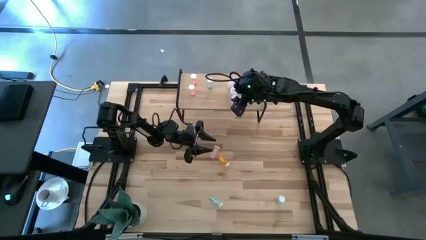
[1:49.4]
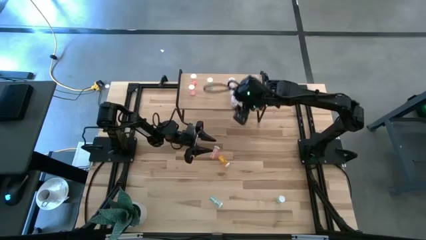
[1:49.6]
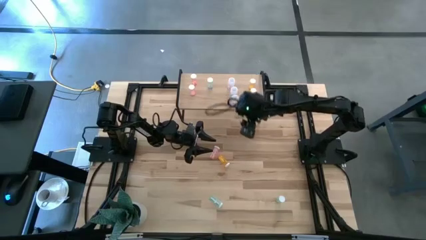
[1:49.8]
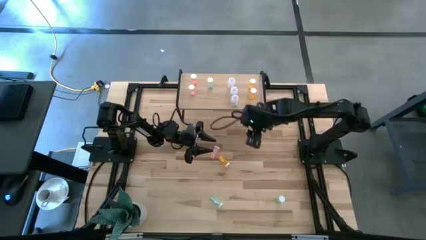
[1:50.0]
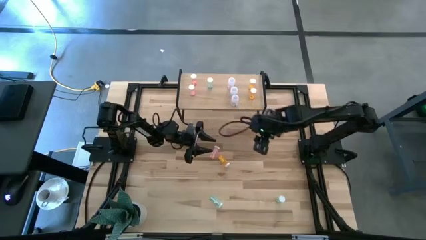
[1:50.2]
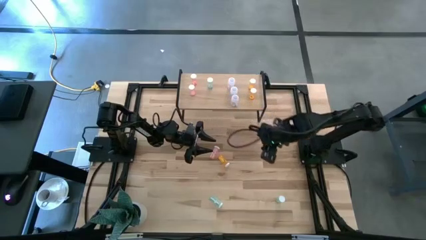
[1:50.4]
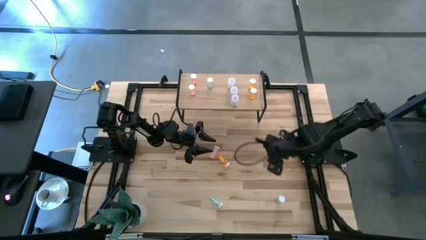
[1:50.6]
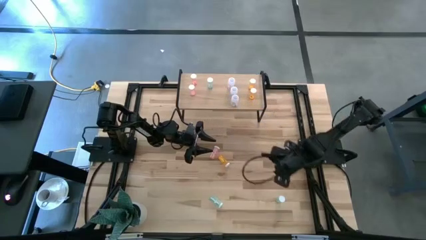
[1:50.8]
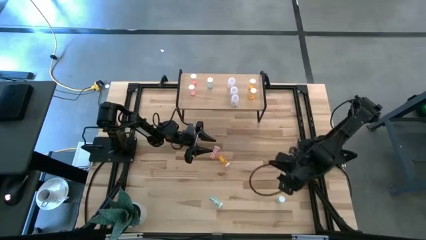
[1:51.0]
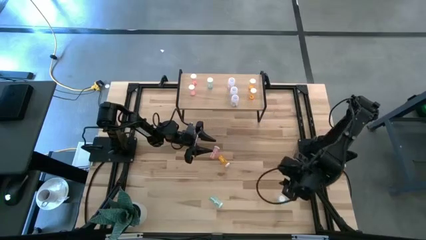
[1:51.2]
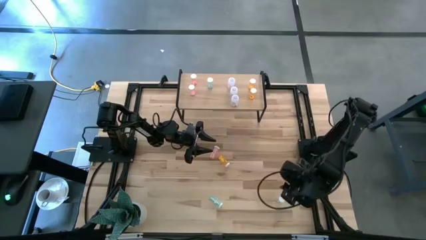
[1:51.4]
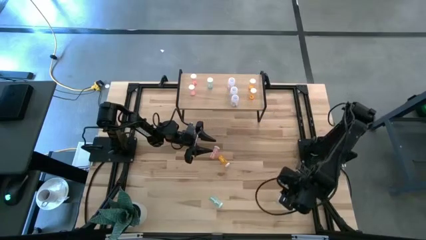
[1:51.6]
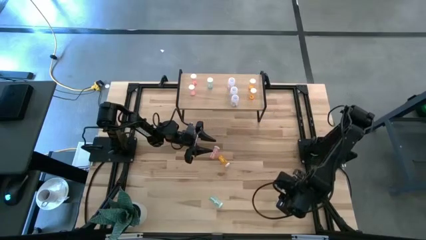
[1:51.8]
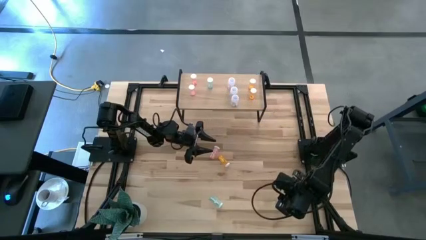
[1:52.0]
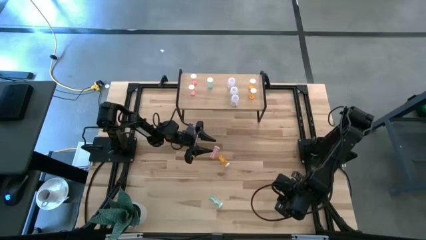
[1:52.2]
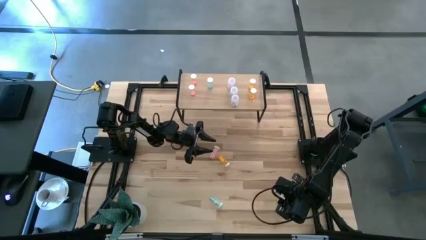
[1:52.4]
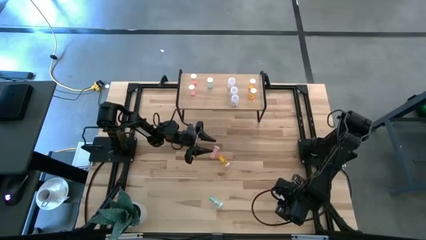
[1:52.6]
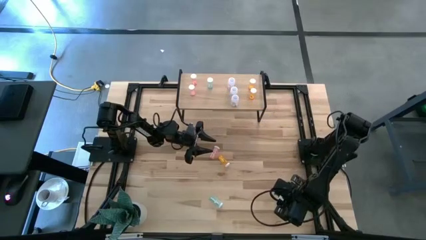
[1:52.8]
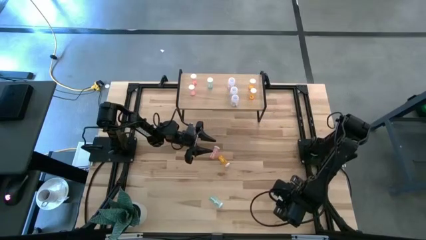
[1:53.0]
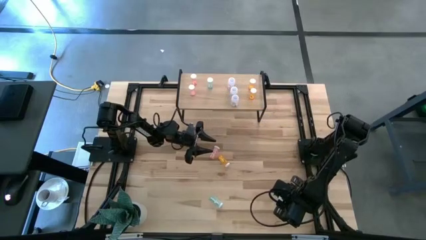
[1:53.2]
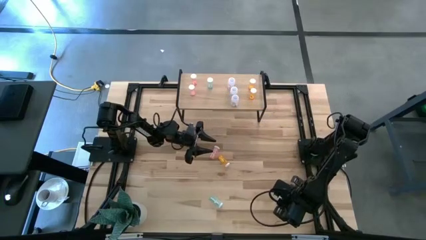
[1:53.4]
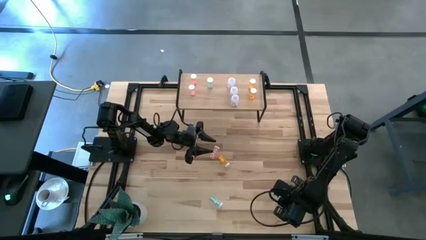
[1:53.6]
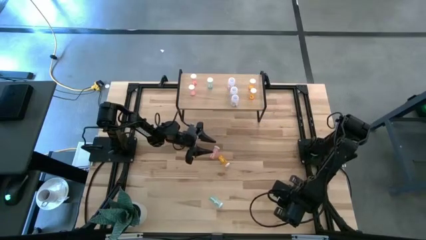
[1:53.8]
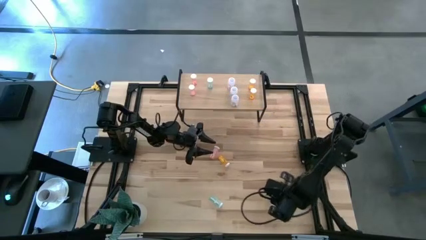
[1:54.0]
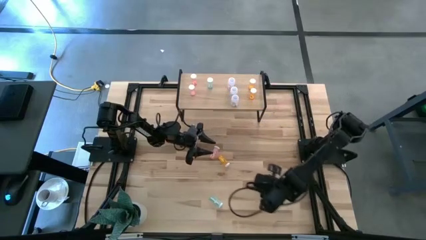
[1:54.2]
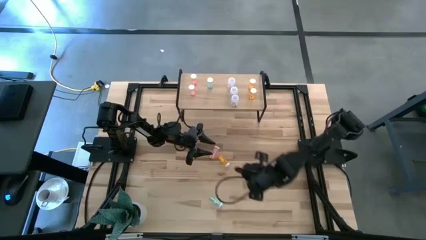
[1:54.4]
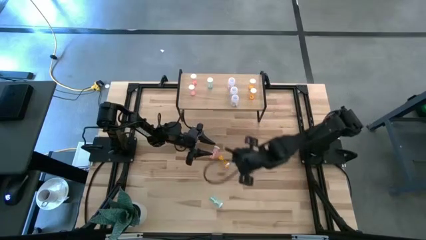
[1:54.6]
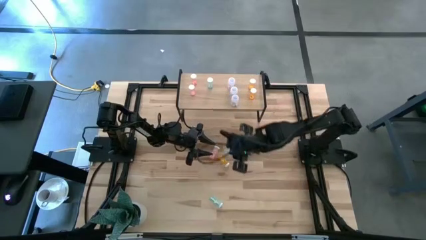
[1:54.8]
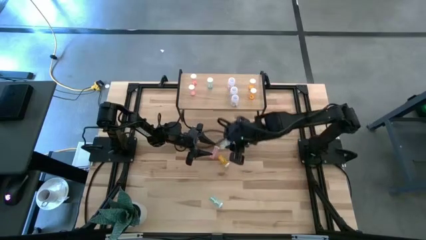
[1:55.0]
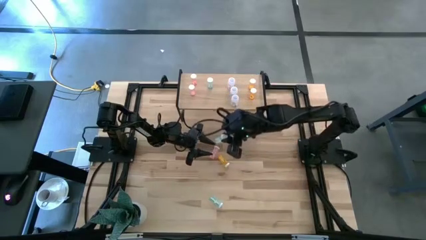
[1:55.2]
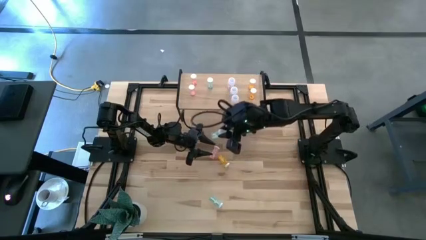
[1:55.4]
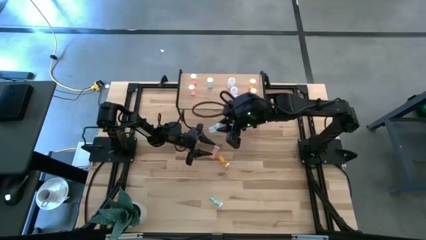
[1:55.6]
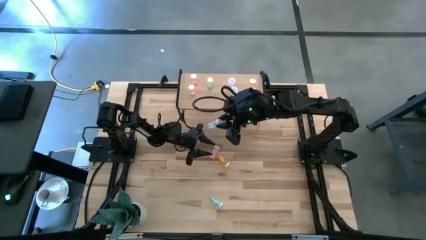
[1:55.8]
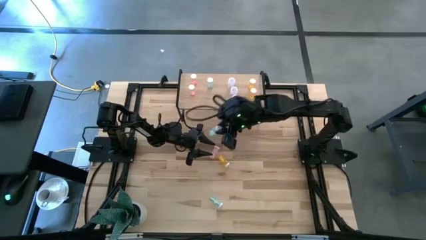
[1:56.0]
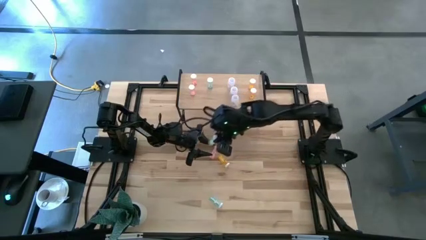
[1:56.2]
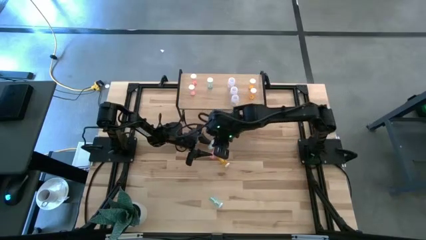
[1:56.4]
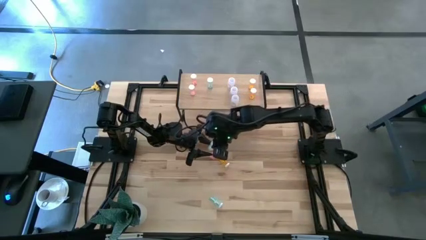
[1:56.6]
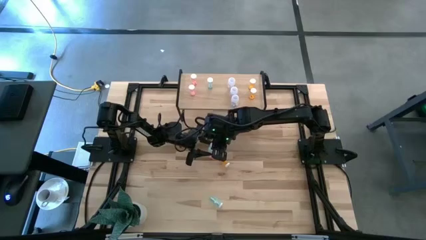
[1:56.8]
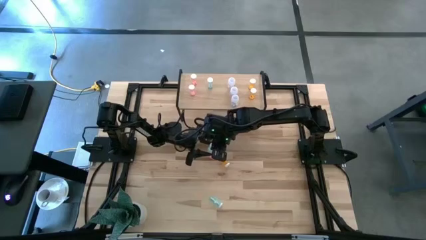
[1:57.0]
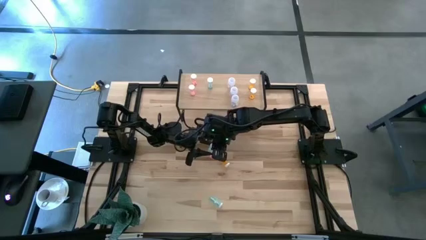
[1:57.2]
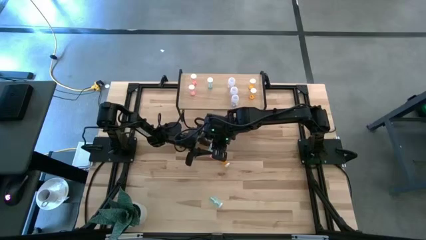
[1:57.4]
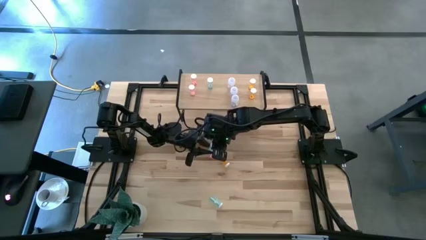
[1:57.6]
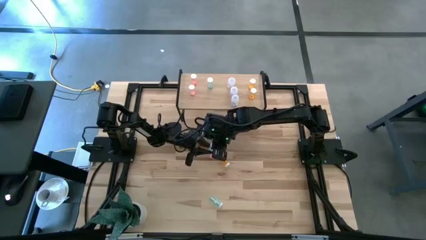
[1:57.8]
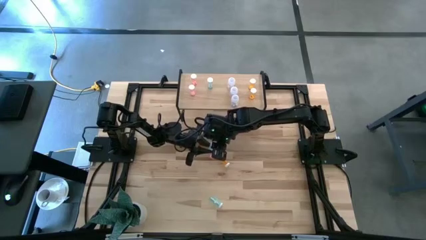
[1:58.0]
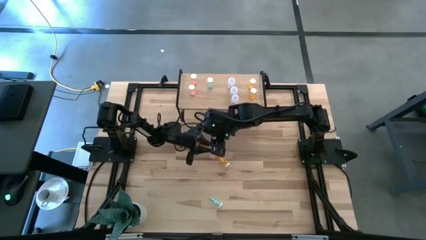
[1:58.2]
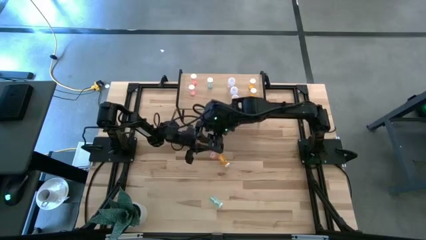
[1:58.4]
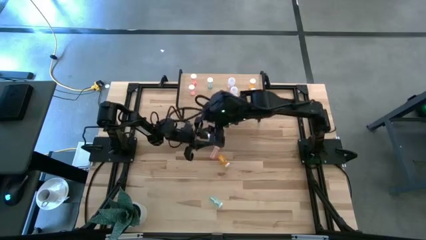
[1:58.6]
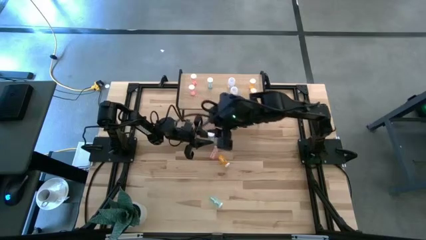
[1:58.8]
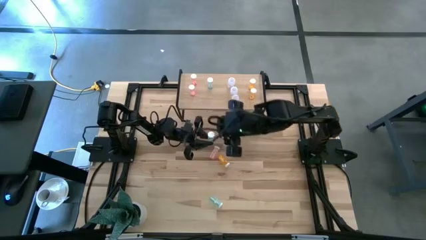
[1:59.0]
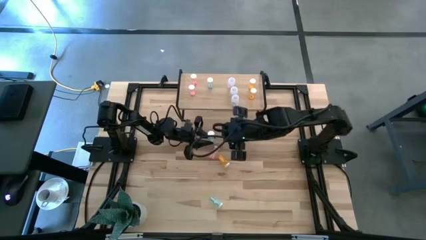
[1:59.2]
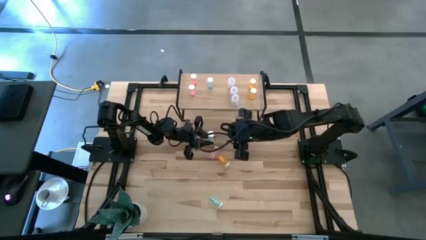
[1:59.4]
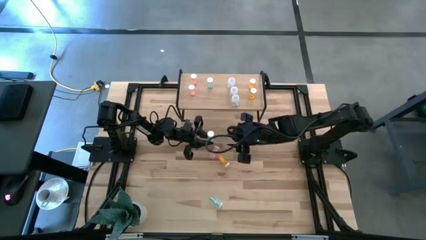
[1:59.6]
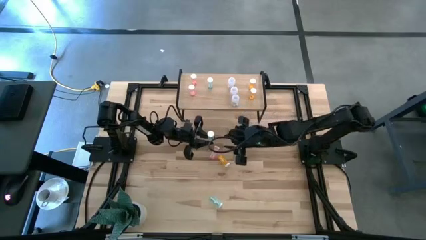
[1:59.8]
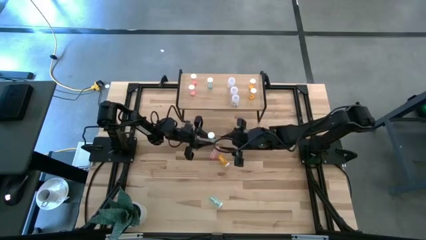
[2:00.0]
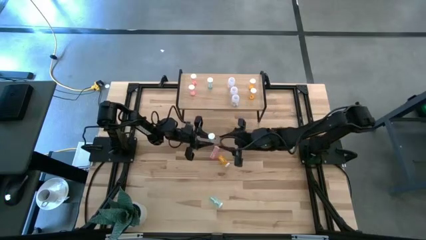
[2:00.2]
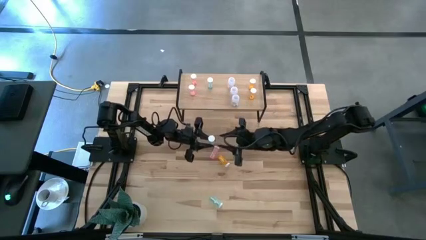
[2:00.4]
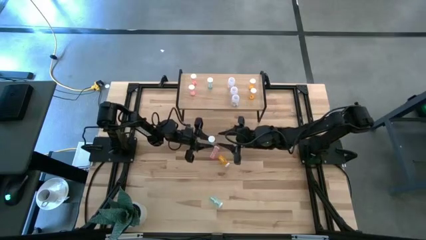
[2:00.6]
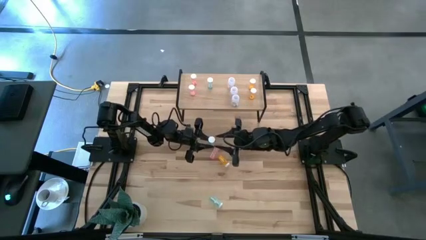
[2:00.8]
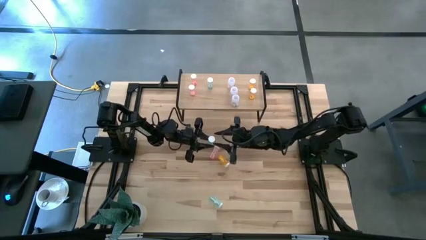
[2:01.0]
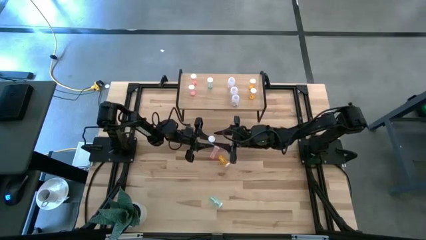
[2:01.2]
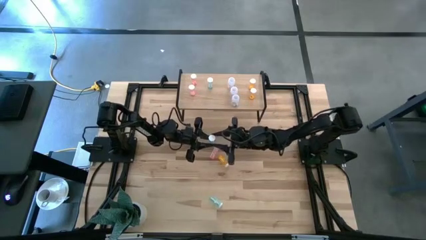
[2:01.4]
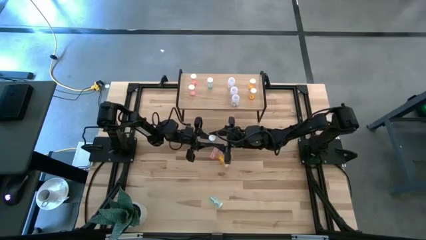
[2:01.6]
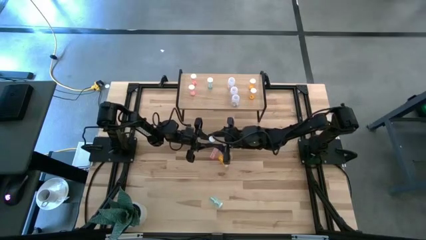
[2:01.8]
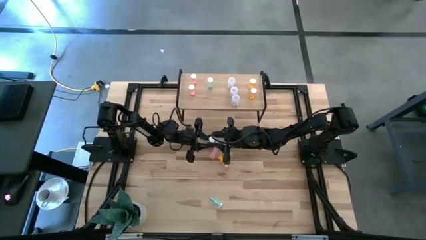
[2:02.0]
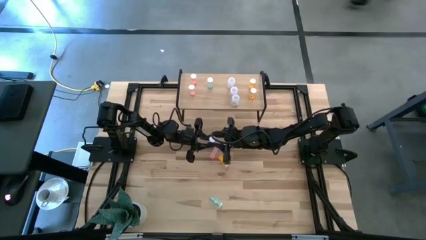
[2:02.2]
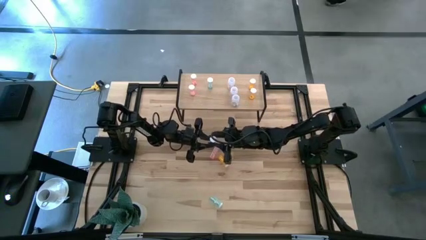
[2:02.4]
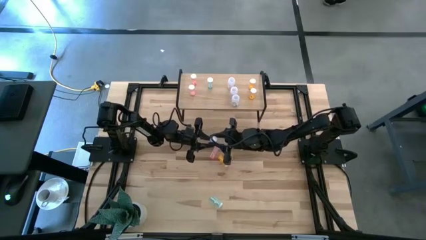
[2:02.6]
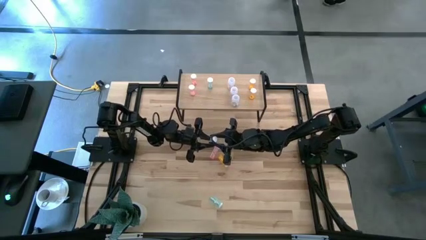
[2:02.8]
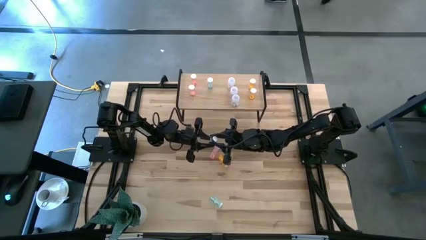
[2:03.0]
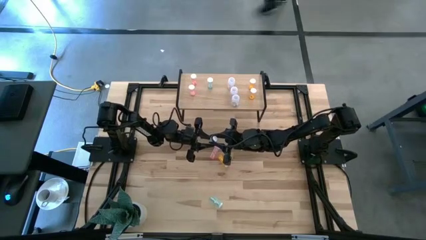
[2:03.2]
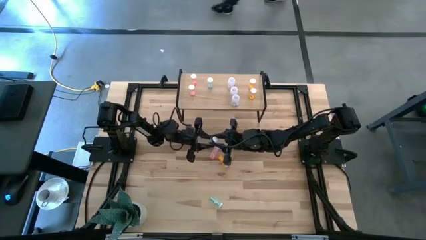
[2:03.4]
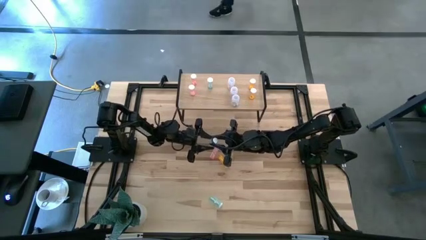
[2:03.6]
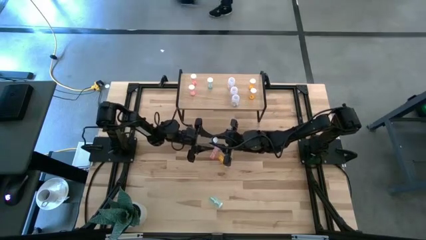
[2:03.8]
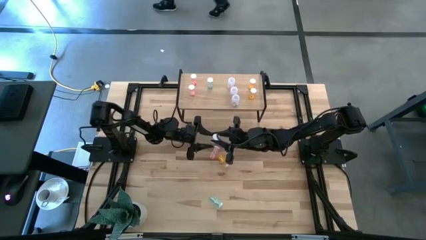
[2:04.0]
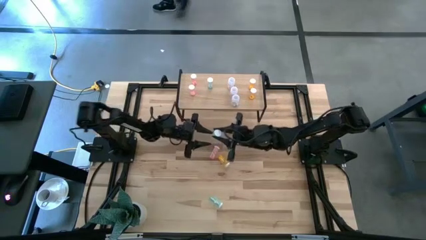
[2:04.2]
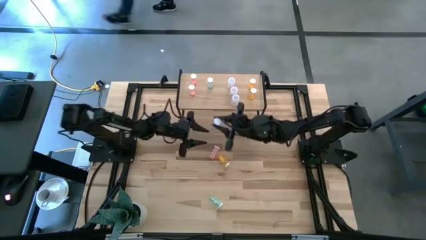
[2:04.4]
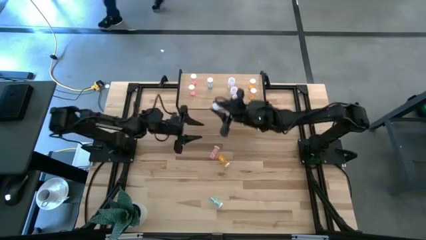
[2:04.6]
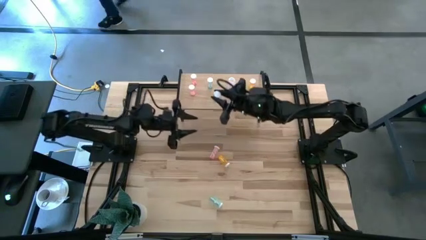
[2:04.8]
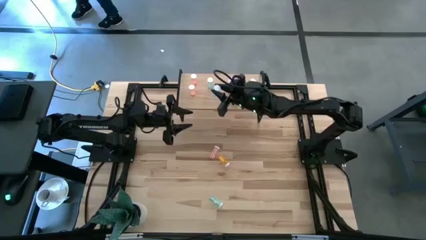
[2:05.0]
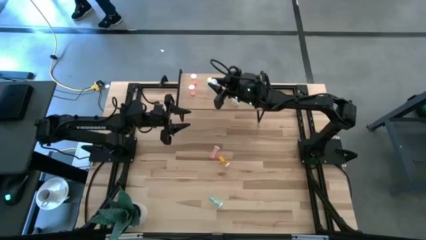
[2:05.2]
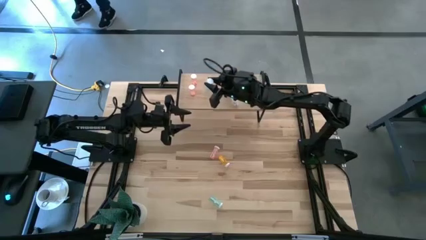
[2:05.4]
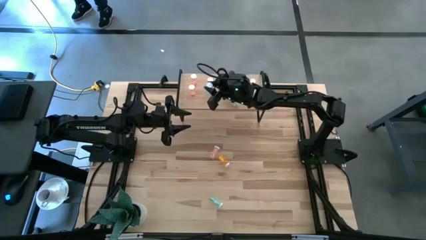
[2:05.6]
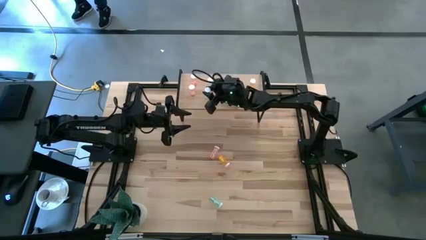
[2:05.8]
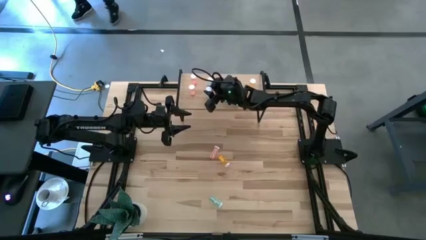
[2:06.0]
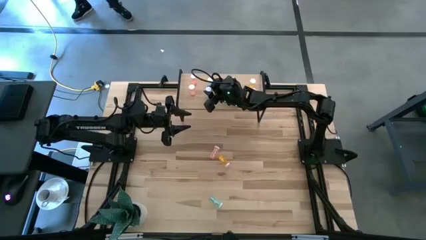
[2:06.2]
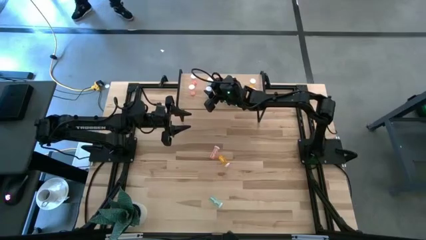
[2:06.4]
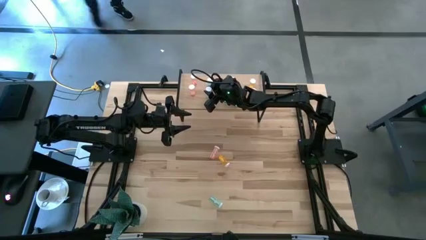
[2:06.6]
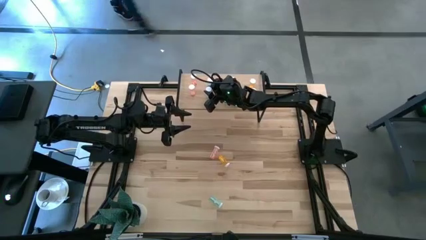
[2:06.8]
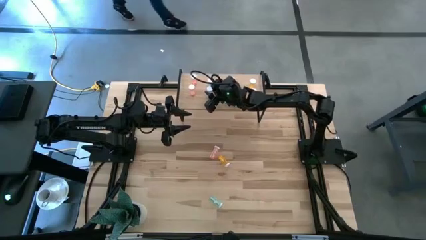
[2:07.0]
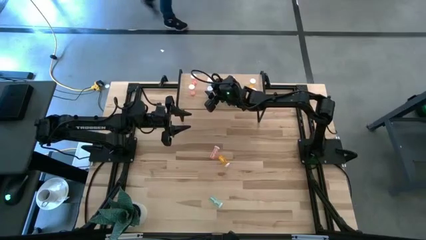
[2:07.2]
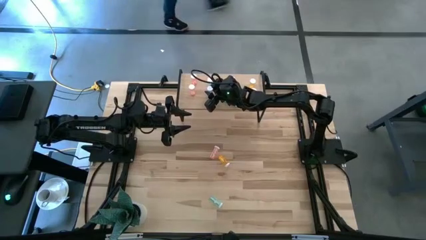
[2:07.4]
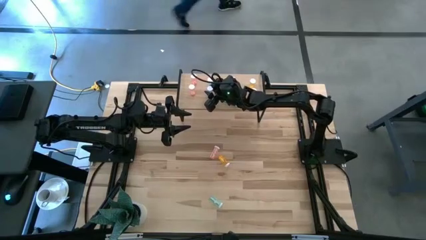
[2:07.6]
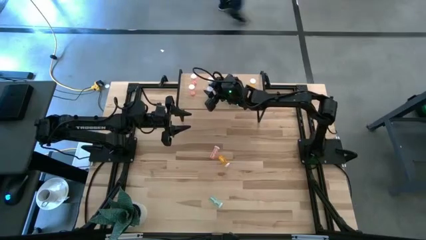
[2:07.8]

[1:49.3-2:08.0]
Task: Pick and place medicine bottles onto shelf by color
Put the right green pill bottle on the shelf aligned with the other green pill bottle
